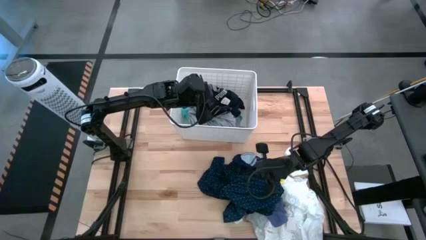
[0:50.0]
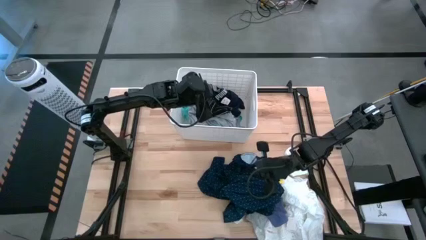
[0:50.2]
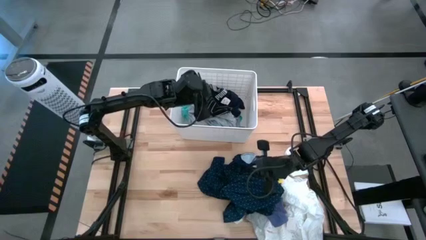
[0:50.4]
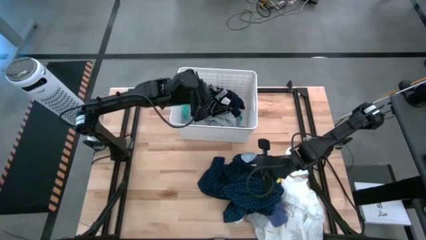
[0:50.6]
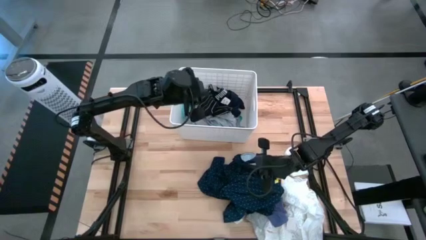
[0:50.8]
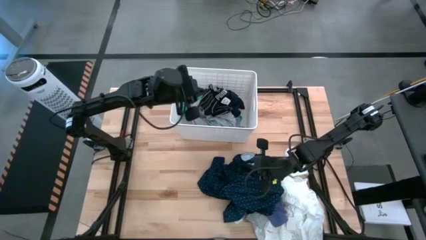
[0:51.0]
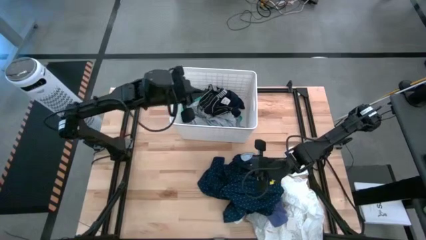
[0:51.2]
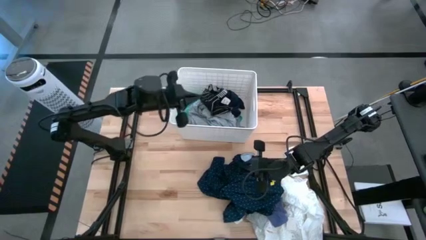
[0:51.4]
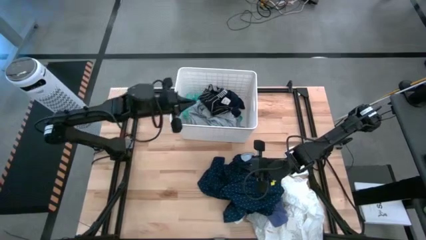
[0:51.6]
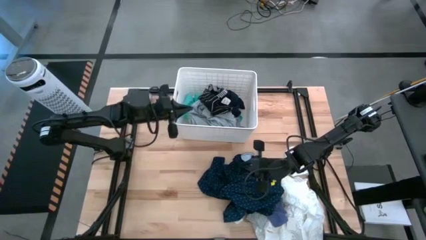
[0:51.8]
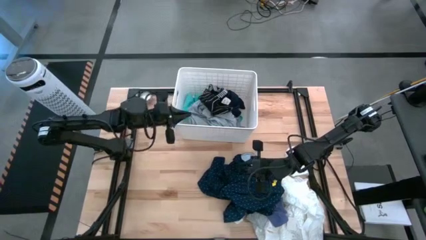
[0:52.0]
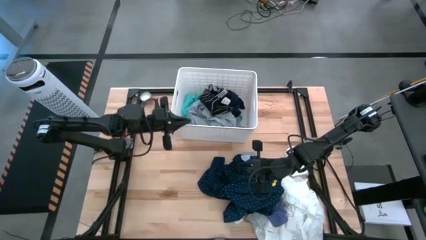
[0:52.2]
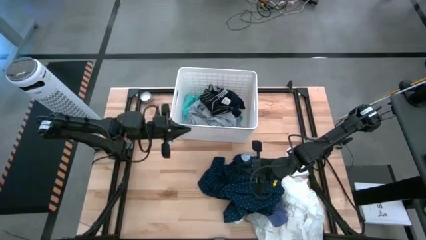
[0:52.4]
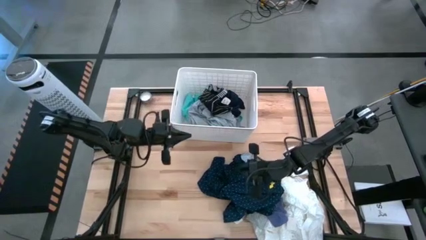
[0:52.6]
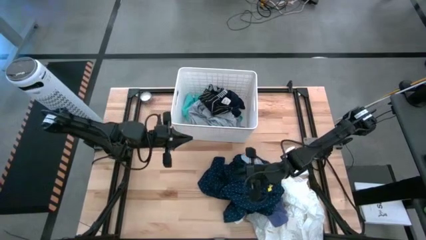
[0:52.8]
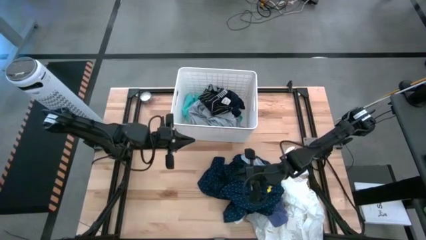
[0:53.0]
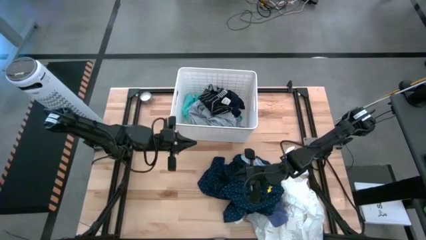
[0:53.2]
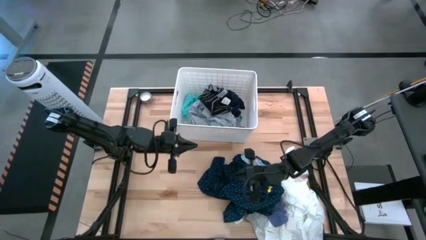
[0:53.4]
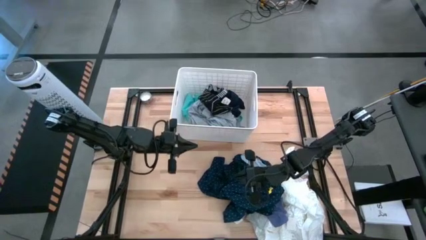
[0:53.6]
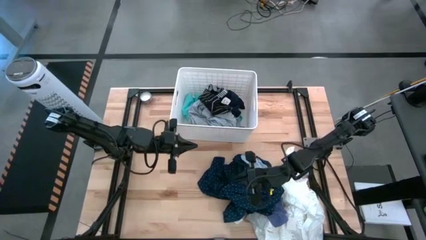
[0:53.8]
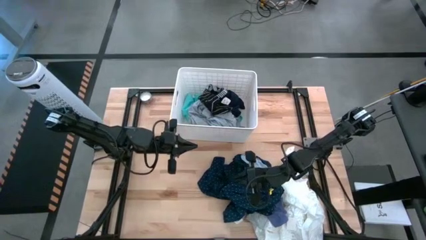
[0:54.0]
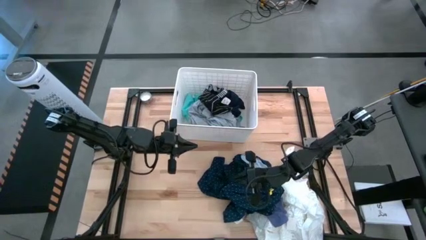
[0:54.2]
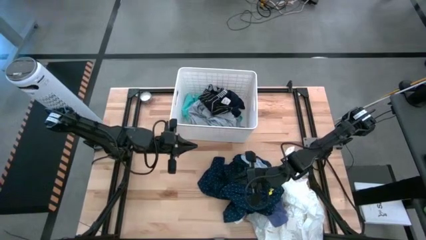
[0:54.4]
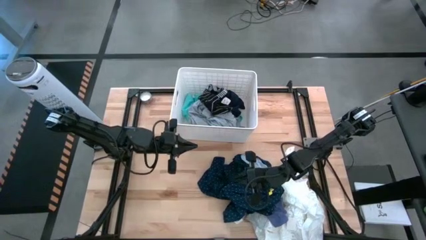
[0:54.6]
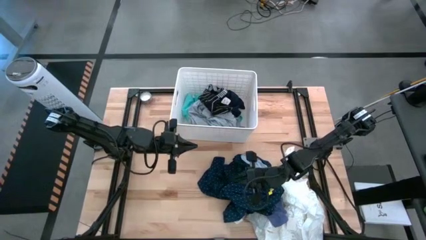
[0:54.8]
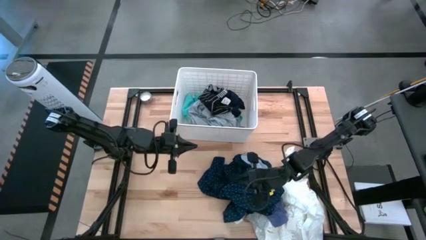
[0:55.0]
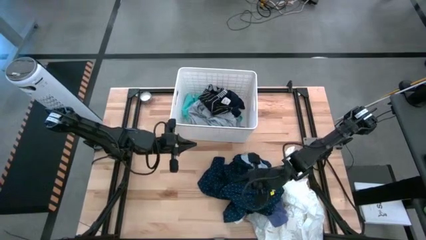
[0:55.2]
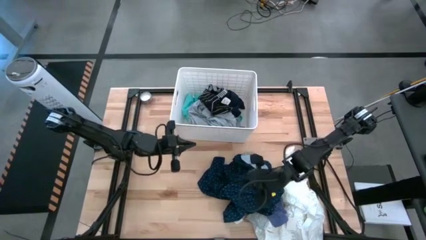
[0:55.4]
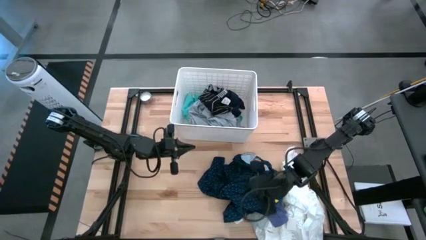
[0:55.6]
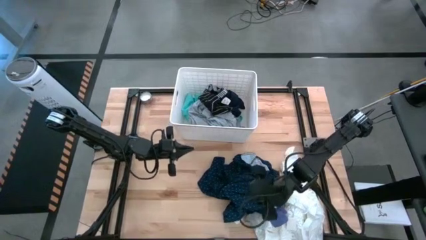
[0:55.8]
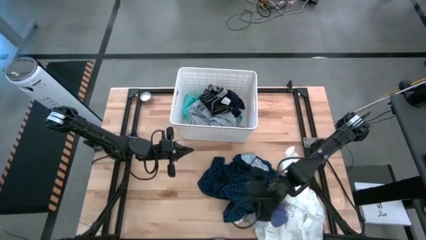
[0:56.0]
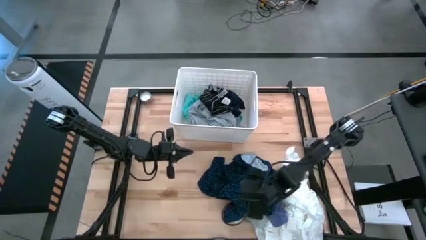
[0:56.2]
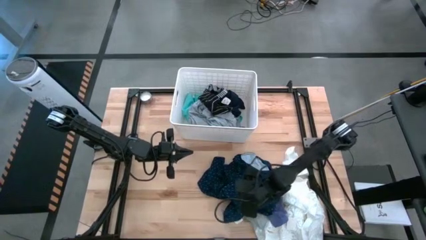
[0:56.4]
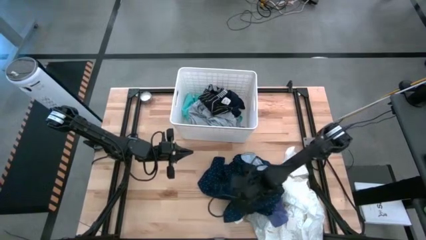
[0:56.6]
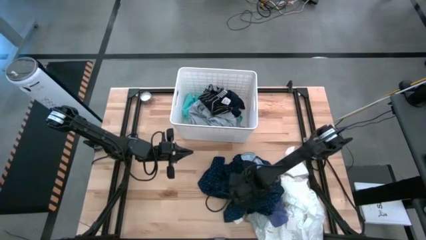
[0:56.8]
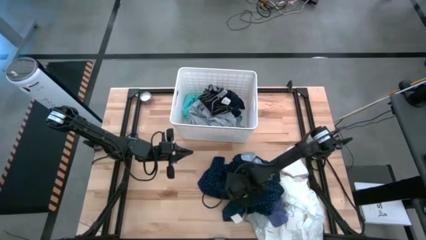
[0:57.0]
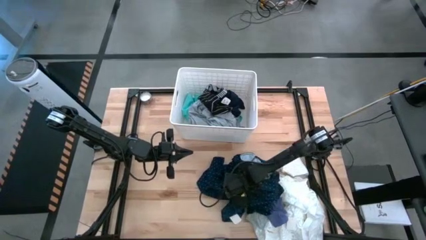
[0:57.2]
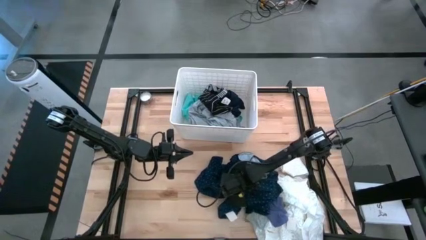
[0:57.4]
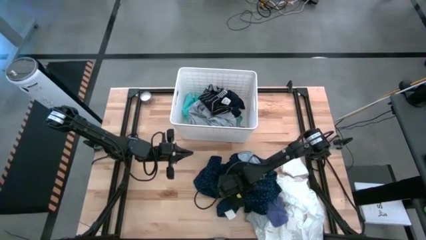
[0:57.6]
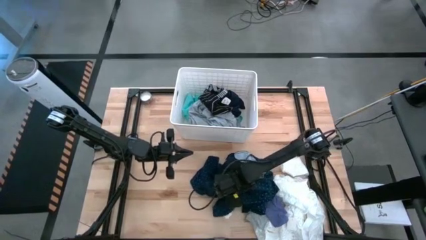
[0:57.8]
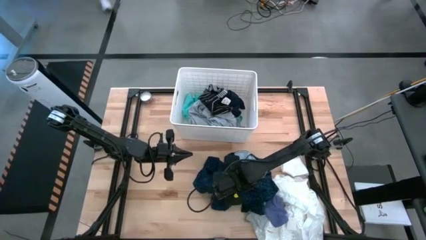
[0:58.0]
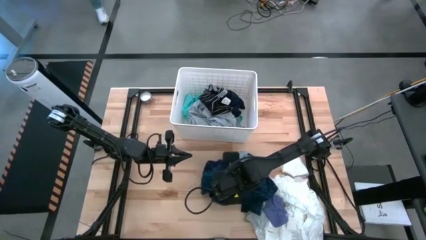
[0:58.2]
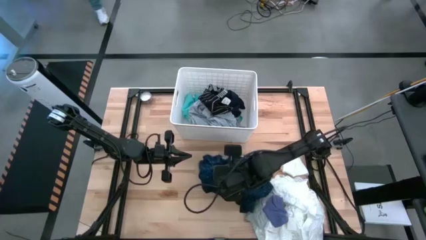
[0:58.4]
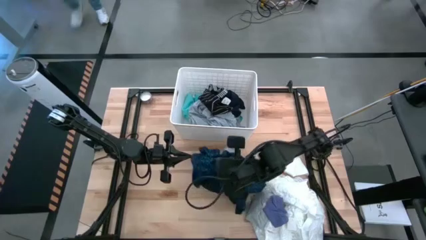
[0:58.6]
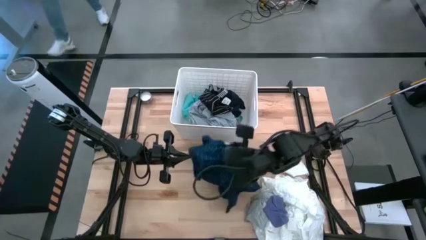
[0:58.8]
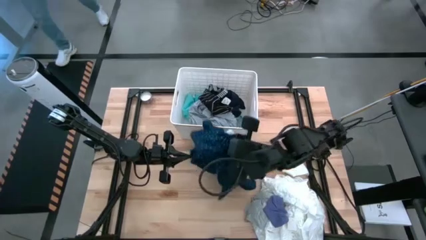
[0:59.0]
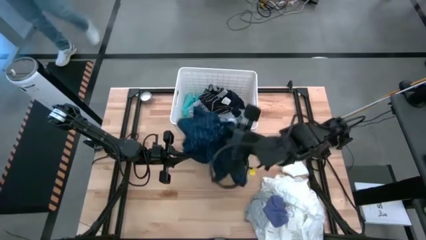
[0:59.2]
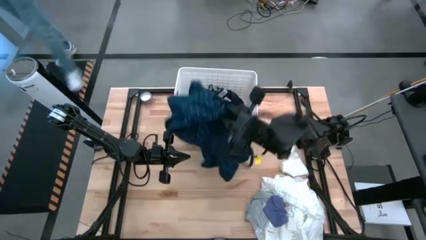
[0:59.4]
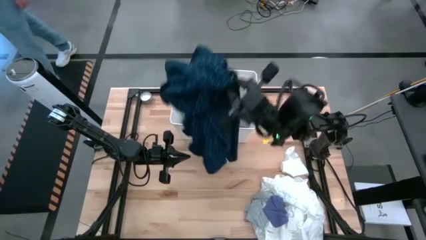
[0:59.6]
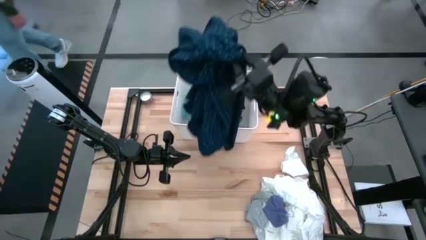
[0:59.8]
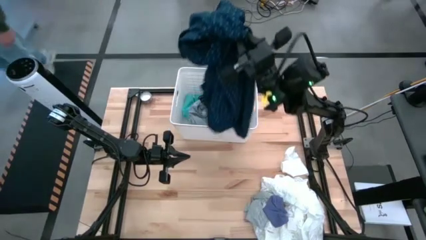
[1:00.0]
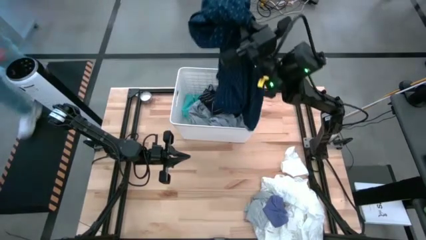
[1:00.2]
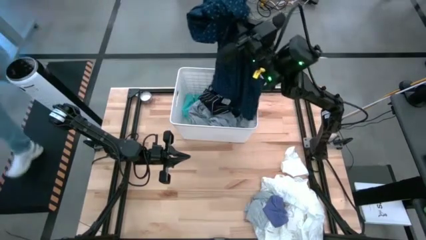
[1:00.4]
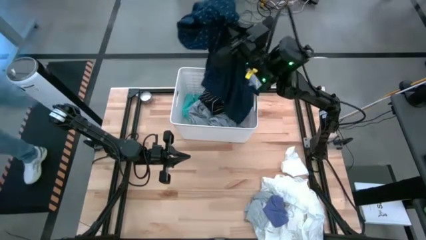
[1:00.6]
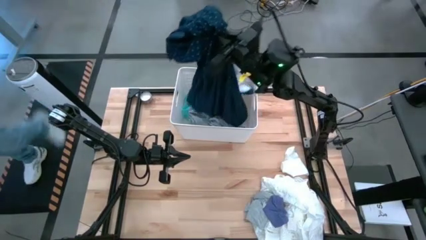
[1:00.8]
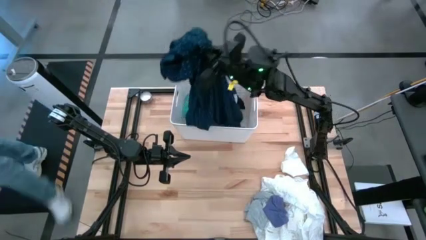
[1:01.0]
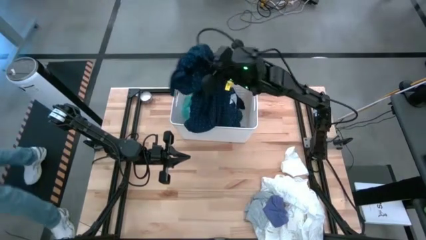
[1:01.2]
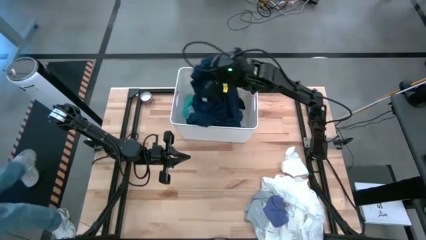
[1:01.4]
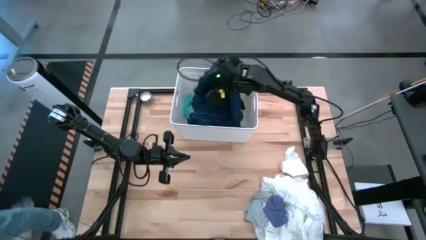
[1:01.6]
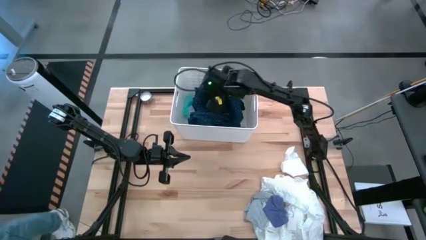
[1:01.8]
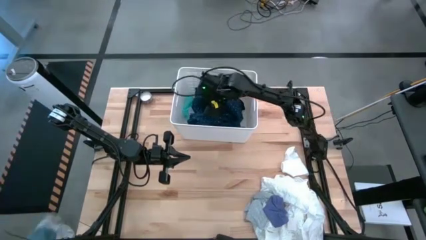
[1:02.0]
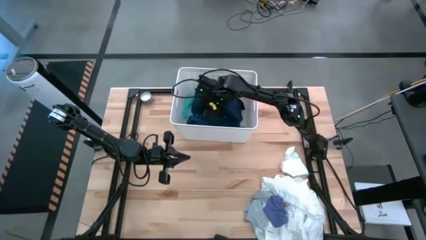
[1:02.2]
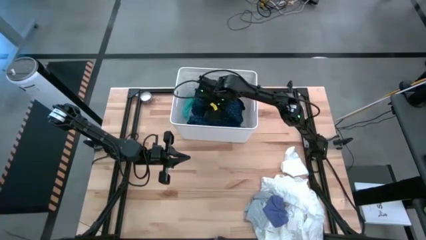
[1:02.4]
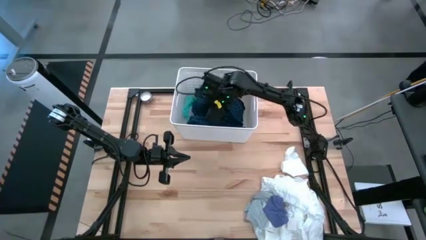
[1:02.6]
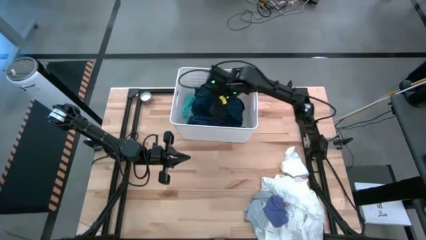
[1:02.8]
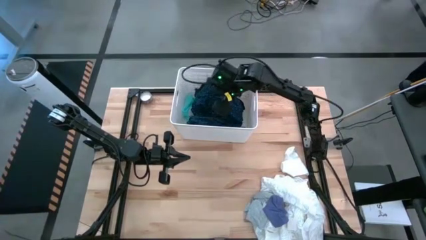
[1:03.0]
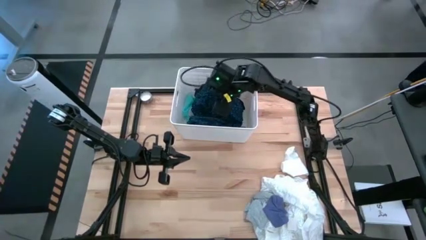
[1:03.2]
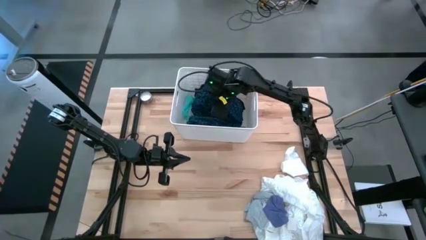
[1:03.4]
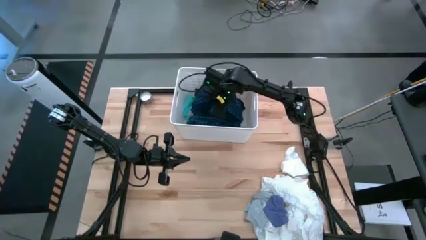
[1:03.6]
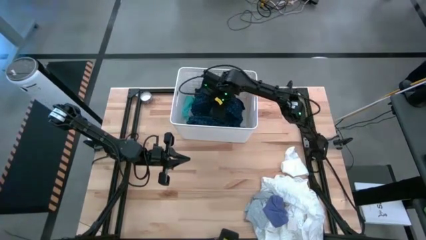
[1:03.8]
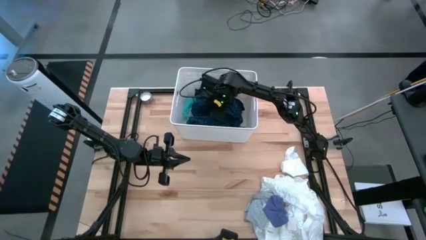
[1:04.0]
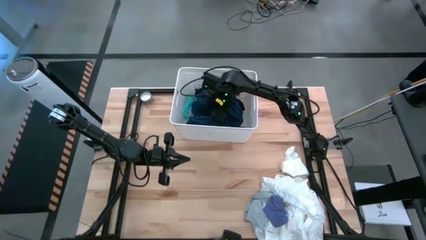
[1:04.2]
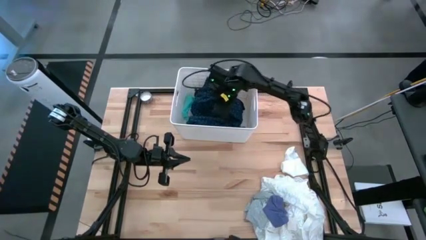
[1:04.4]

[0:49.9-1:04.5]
Task: Sort clothes
Put the blue polo shirt into the laundry organizer

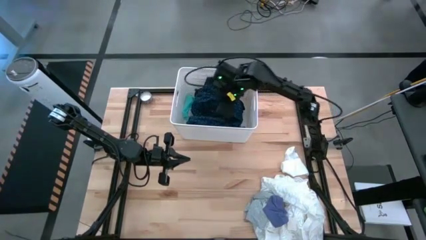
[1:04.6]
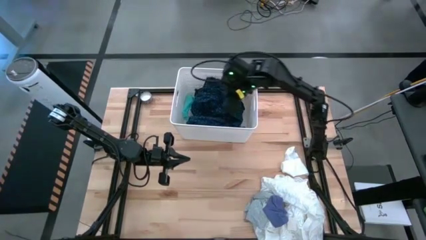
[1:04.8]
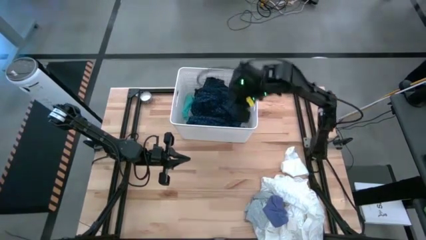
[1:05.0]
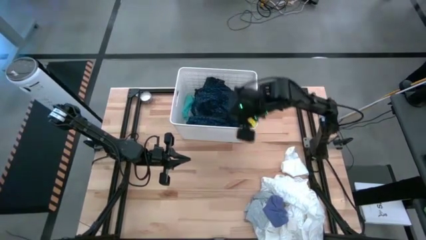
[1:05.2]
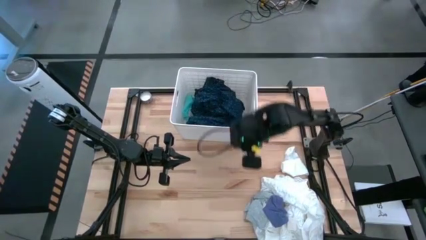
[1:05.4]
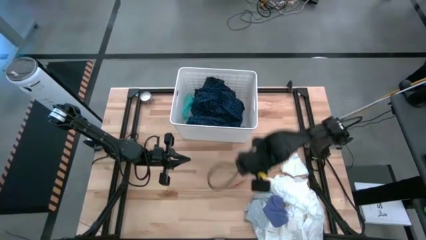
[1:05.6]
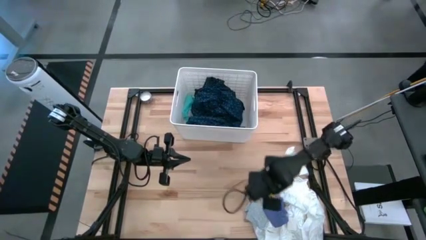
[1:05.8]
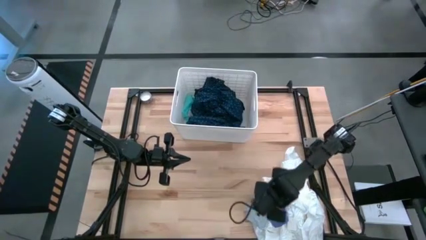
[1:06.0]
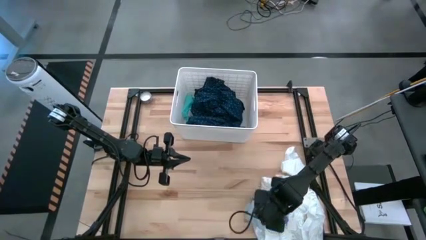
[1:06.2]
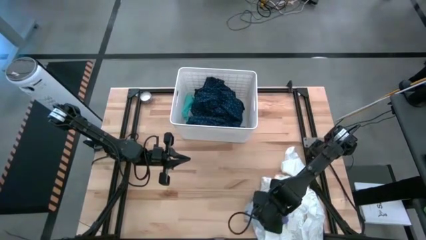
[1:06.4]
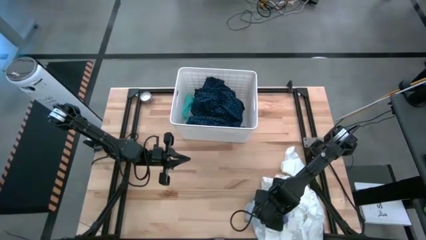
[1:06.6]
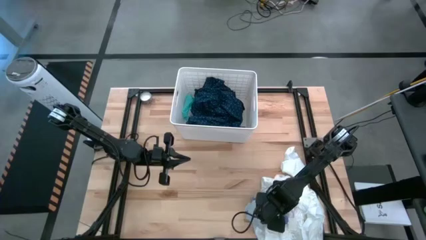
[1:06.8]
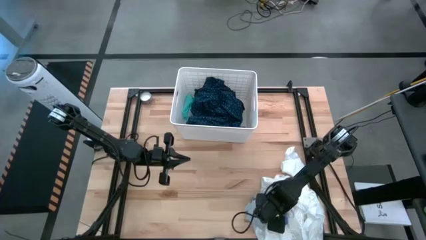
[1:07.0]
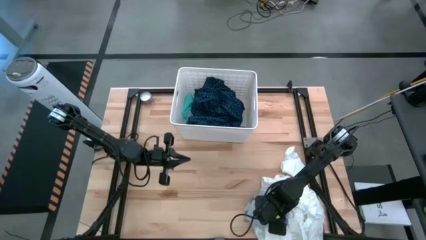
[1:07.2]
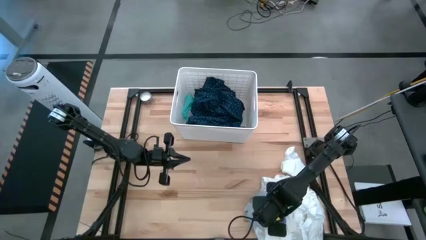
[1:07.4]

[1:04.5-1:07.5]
Put the blue sock into the laundry organizer
